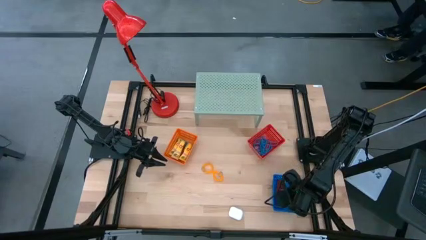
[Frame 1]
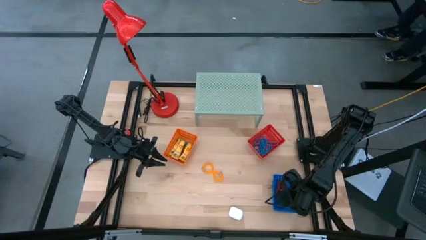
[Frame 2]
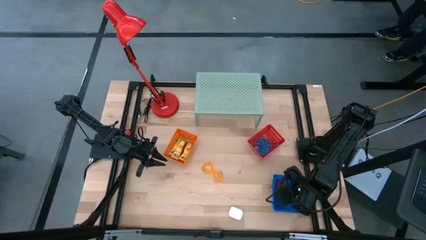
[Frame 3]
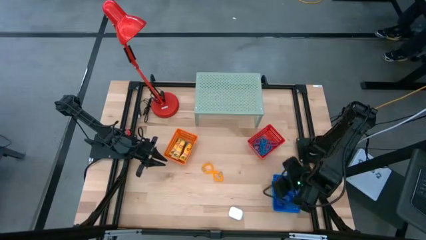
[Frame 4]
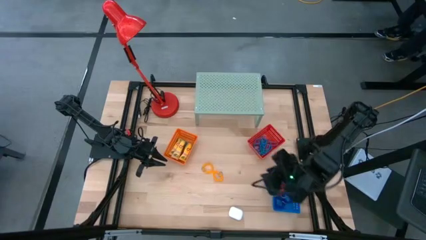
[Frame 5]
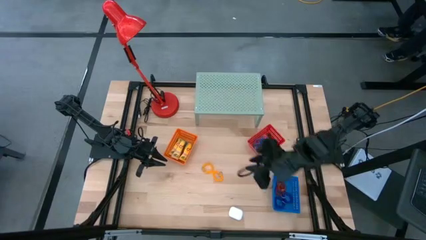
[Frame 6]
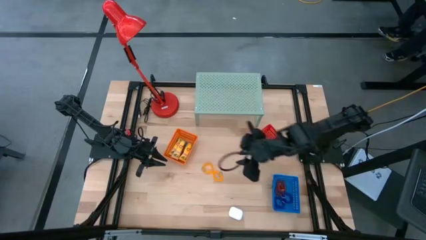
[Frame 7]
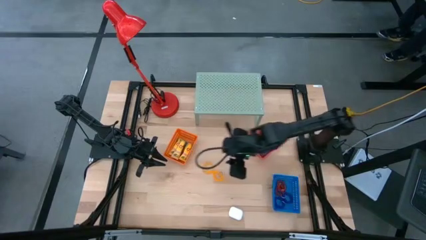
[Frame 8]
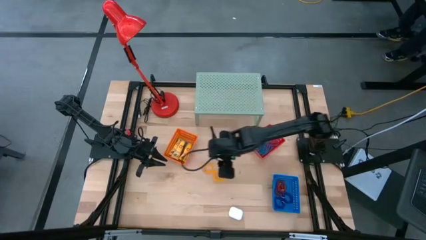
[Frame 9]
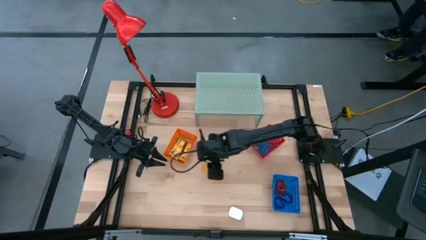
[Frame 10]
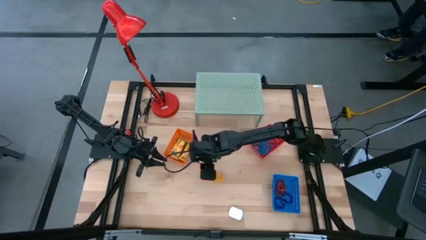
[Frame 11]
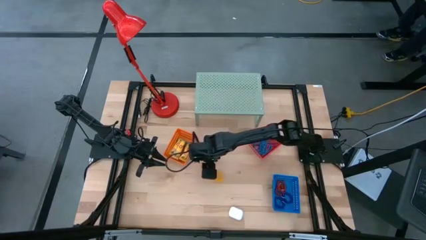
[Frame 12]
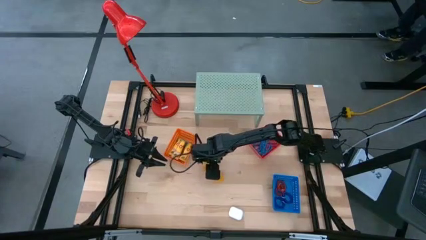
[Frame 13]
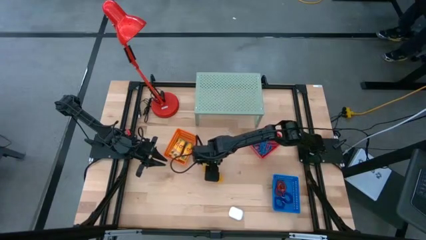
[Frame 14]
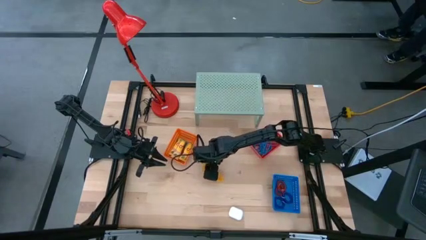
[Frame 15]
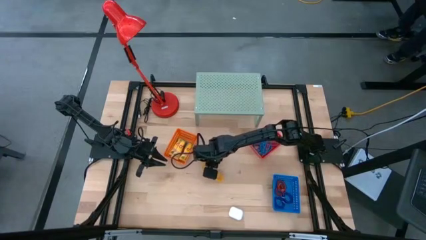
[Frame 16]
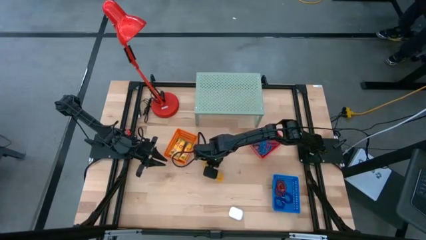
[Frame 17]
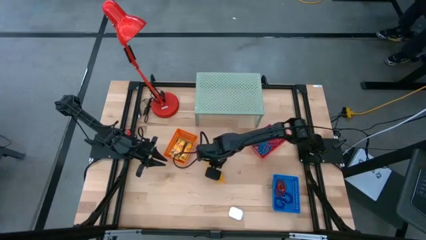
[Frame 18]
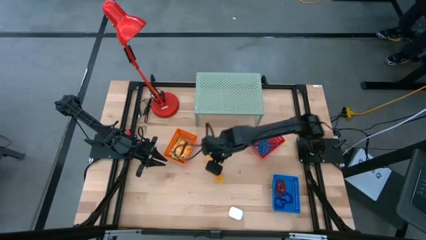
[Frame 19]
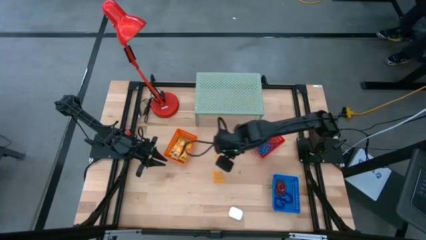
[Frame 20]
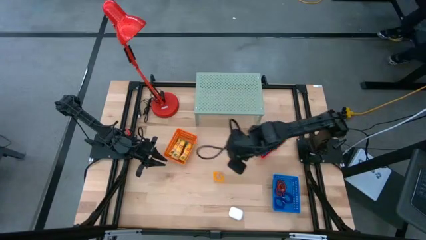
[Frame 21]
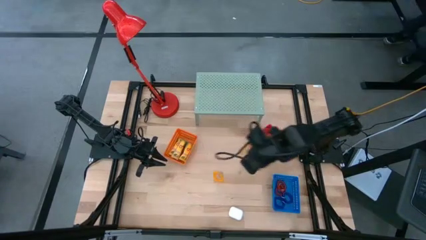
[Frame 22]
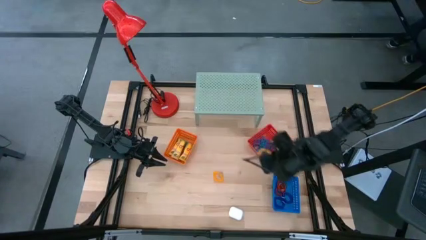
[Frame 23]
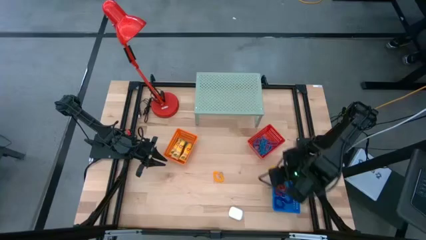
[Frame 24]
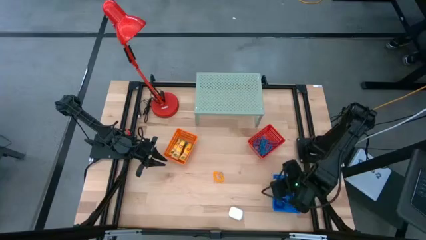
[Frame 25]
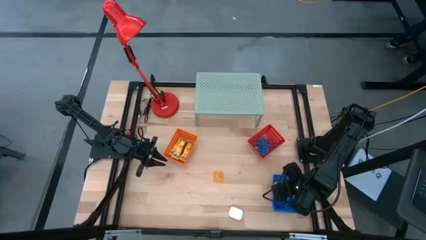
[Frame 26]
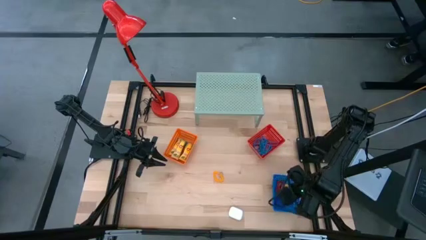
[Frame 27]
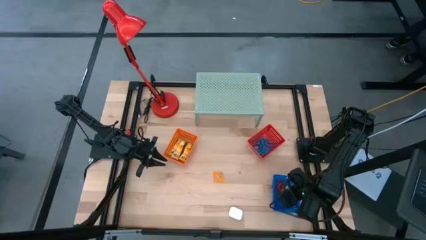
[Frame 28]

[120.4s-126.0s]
Task: Pick & Place Office Desk Supplies
Put the yellow spring keychain into the blue bin

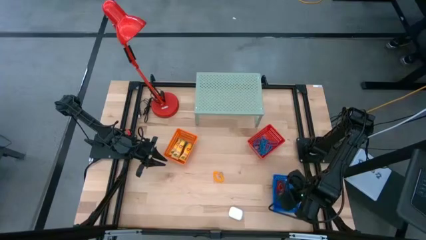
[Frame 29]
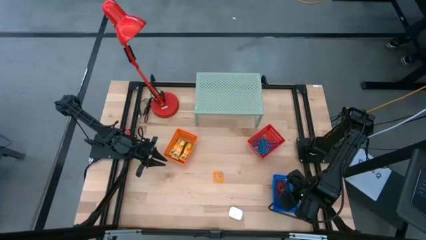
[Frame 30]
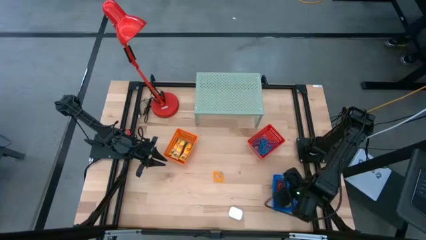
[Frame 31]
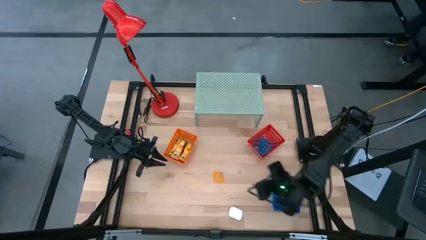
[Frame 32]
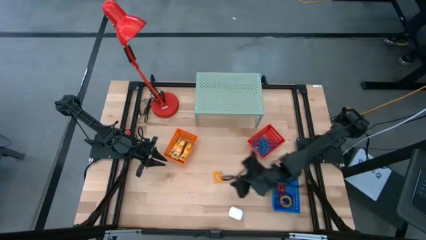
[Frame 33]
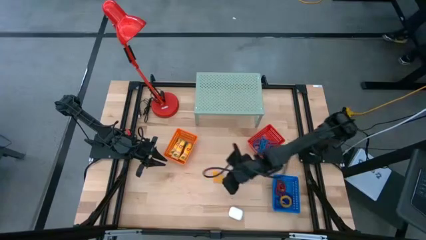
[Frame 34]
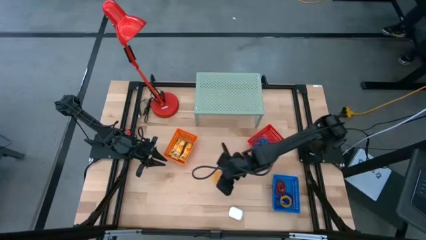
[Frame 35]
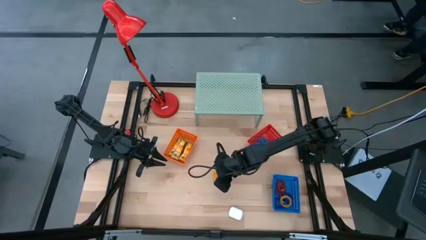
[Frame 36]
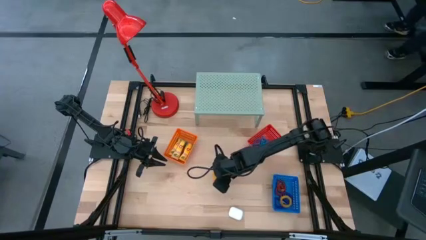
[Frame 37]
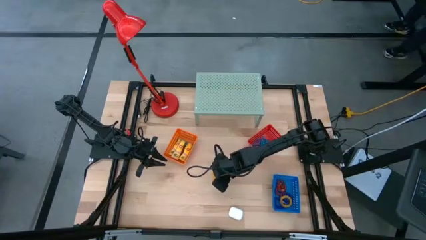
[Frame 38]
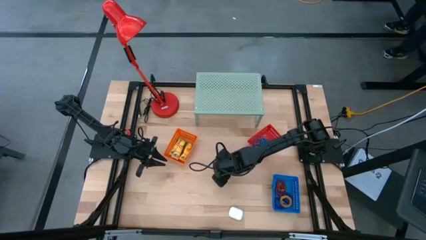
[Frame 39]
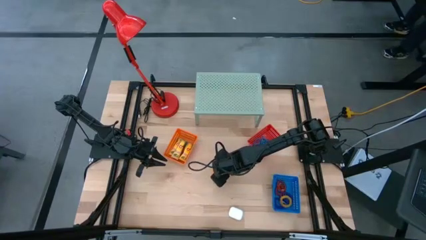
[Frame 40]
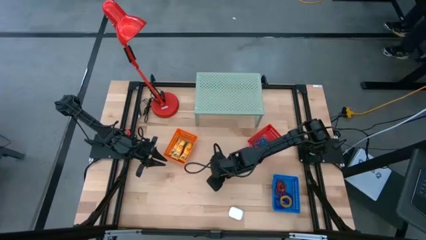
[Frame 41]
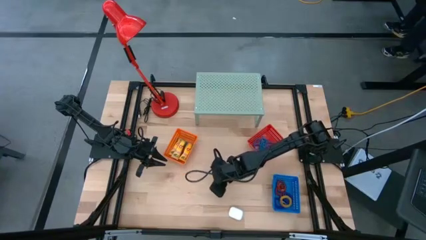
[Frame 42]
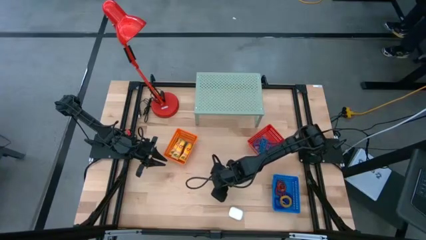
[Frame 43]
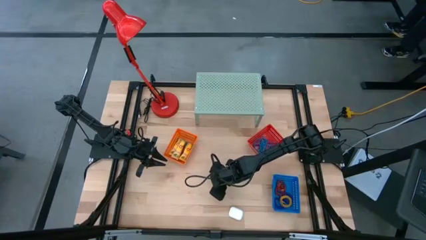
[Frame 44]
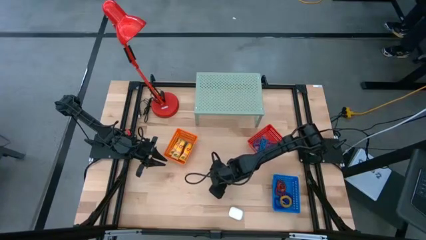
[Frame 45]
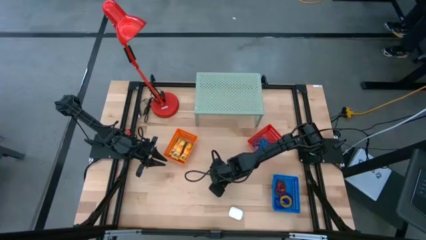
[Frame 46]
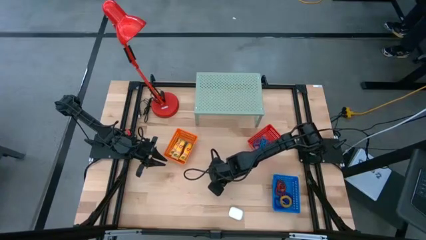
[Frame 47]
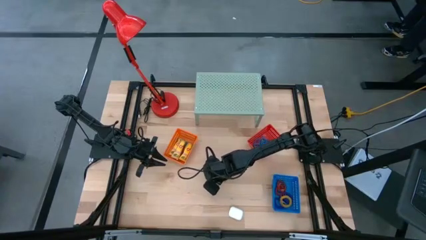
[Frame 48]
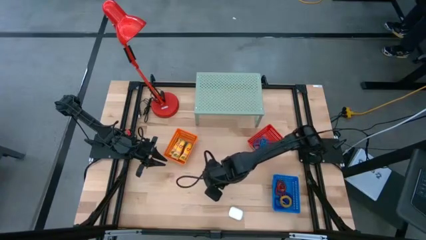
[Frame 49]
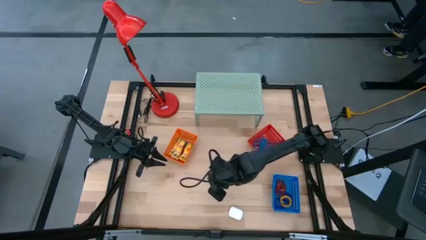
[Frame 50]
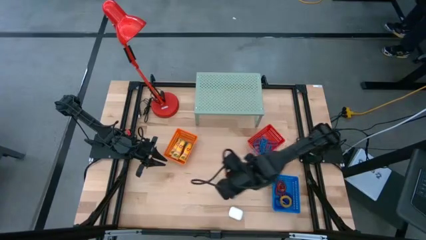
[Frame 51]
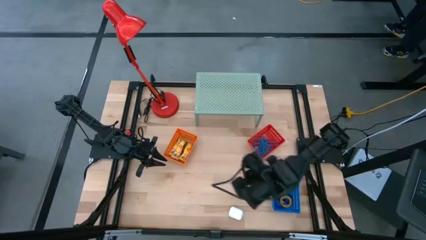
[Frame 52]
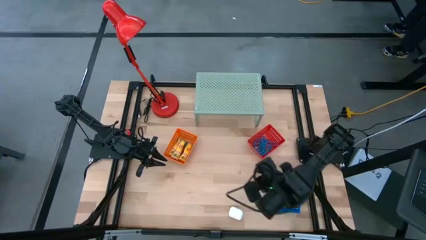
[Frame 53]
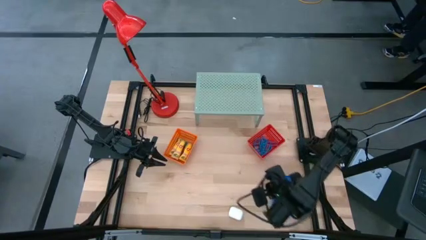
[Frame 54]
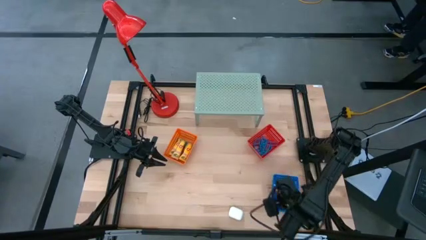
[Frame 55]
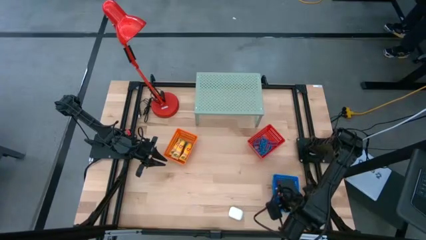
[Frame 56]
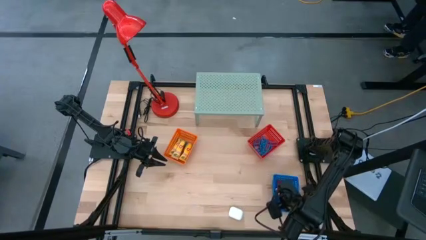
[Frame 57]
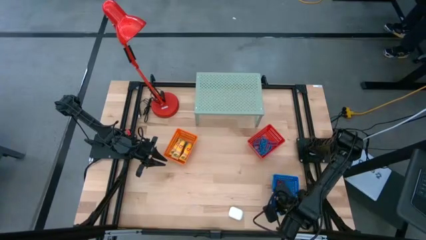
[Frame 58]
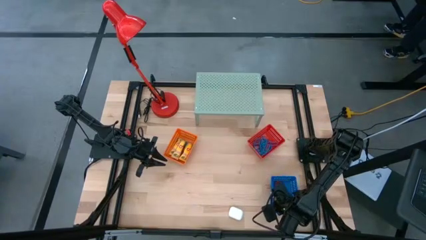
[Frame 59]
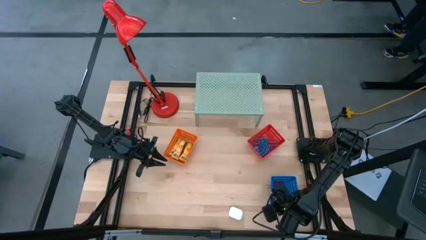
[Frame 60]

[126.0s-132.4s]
Put the yellow spring keychain into the blue bin

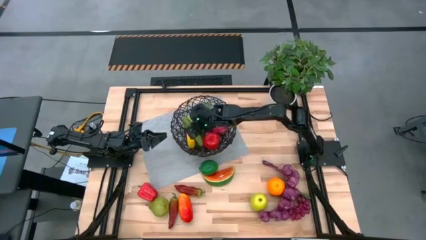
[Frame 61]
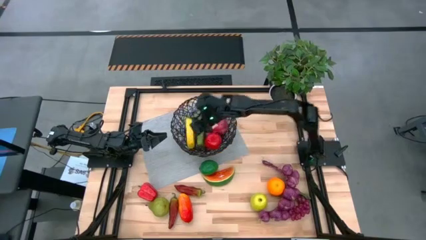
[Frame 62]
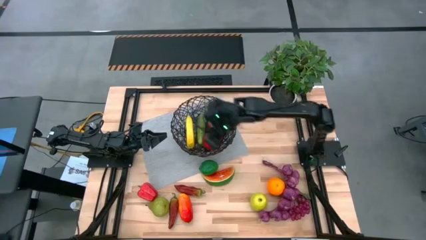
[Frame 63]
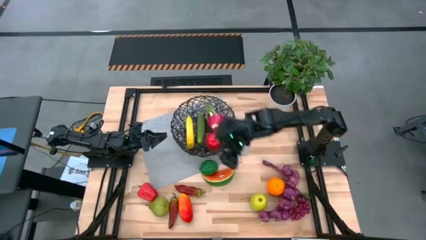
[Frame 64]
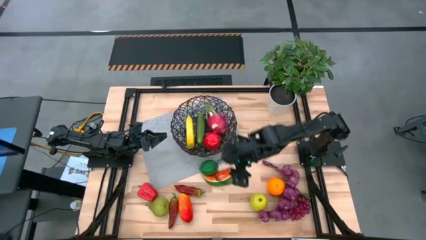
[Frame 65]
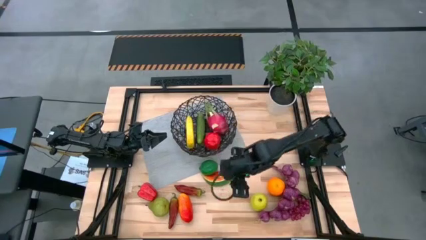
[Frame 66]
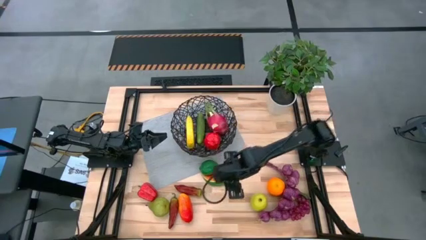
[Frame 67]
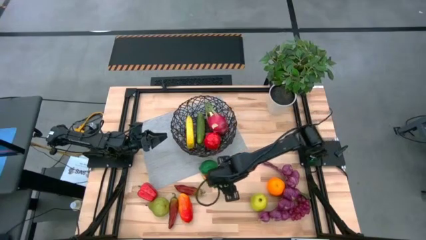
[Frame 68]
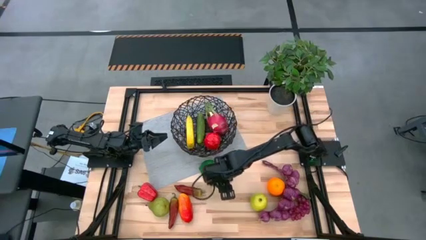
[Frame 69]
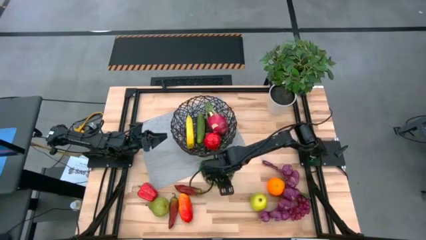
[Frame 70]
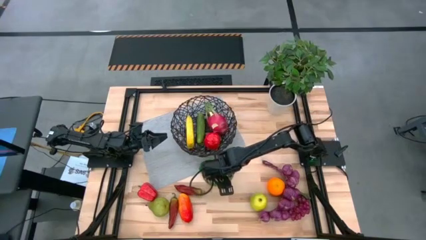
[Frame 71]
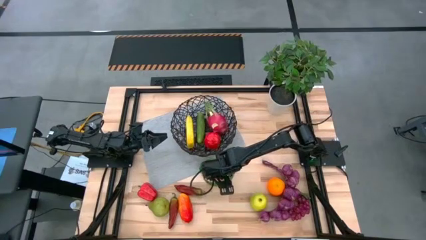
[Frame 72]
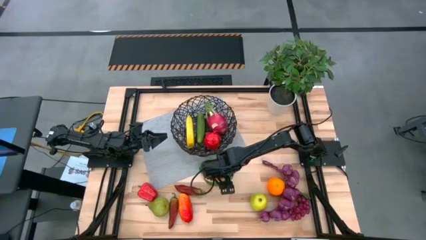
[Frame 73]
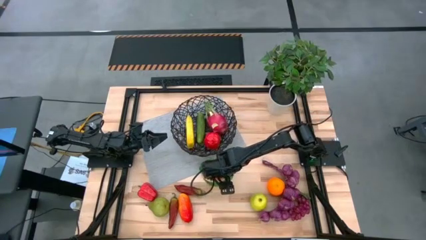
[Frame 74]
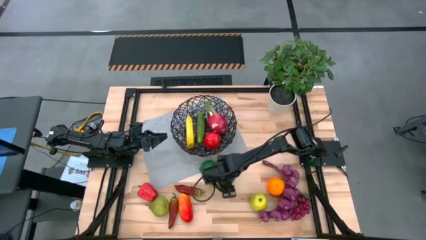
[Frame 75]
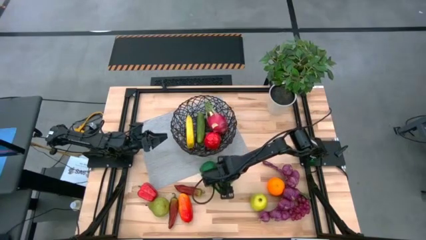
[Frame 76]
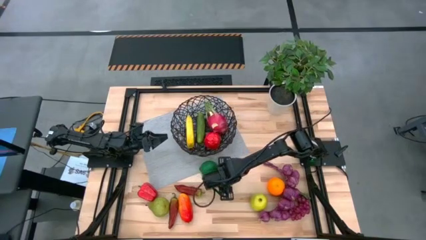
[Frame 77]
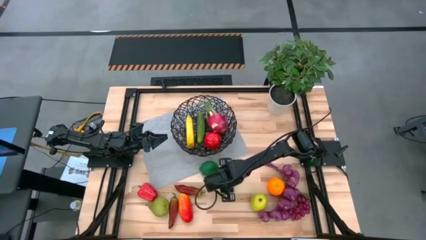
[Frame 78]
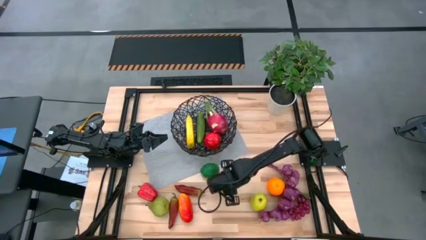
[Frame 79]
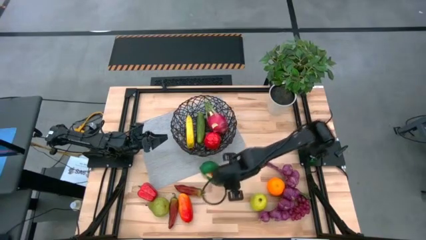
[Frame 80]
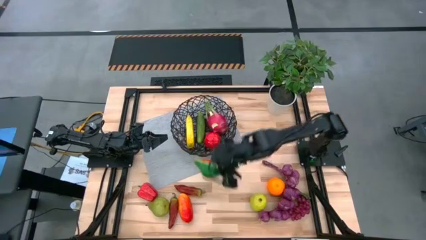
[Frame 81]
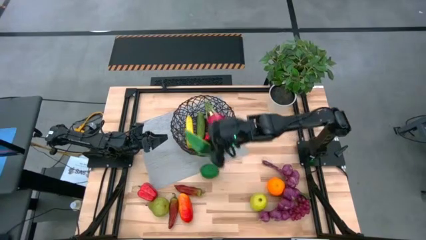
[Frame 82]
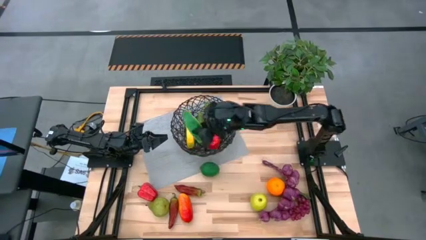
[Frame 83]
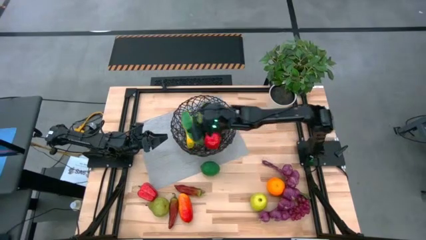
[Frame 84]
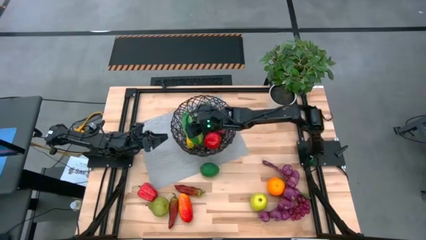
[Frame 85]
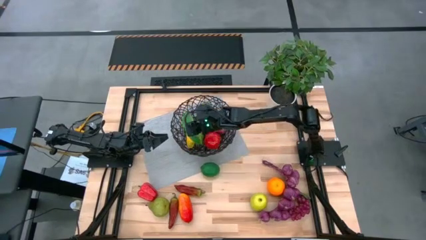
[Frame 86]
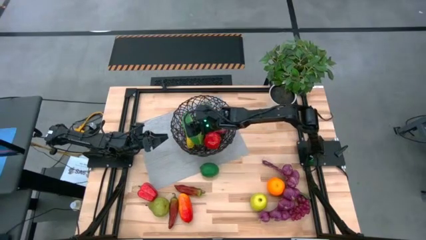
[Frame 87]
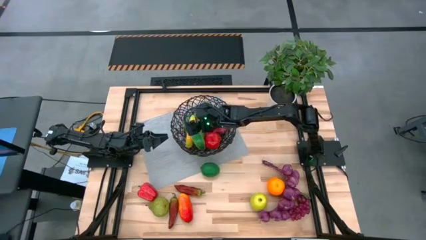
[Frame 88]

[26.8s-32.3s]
Task: Build produce basket
Put the watermelon into the wired basket
